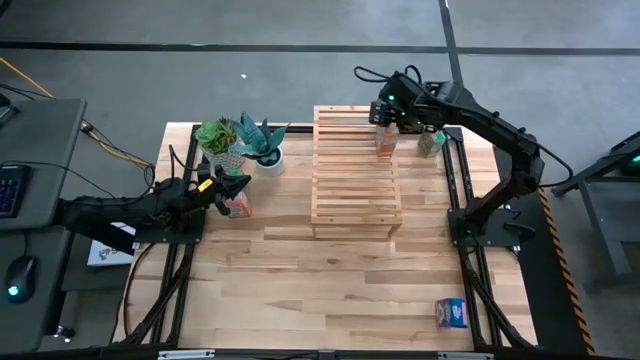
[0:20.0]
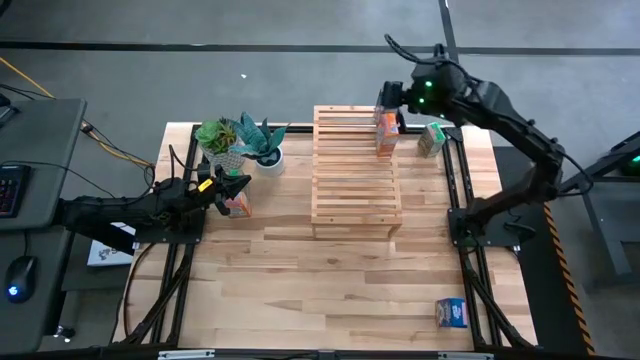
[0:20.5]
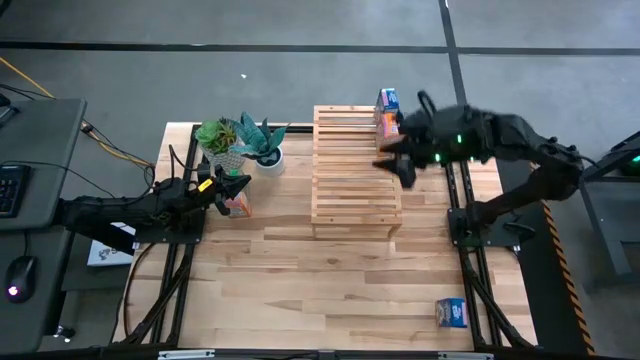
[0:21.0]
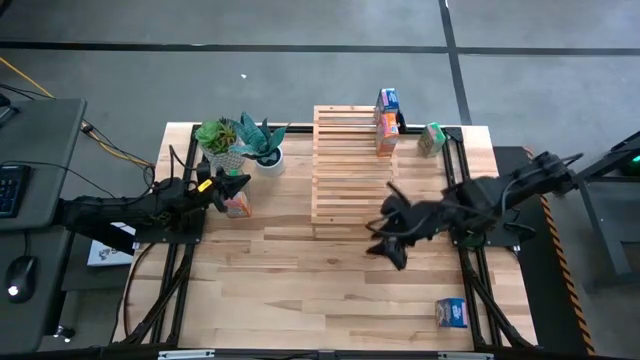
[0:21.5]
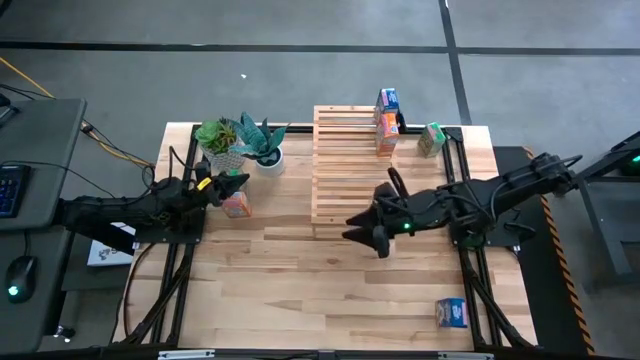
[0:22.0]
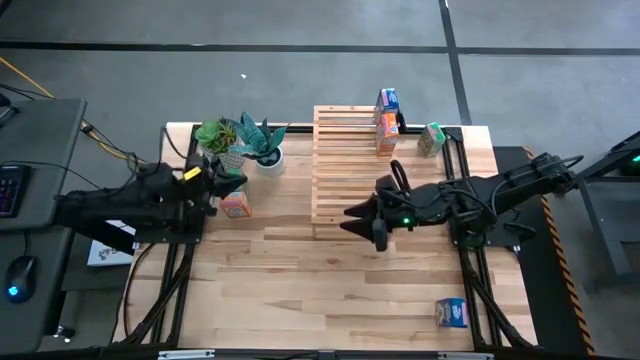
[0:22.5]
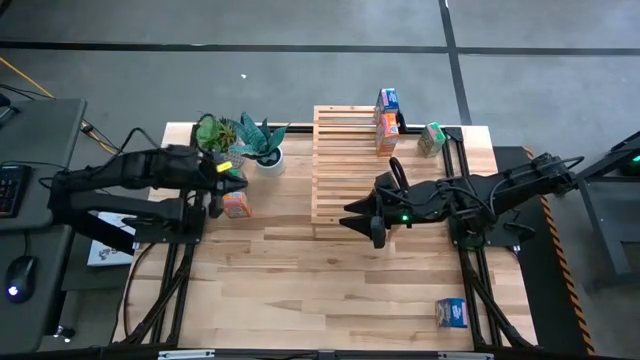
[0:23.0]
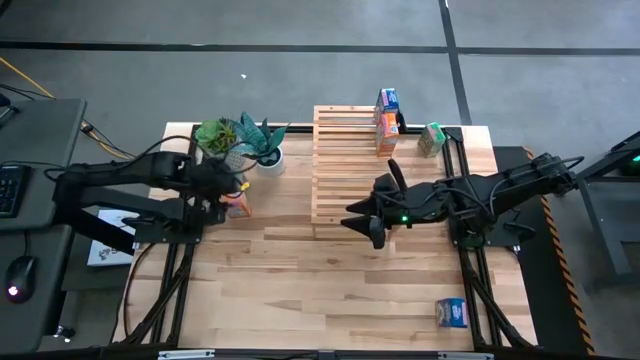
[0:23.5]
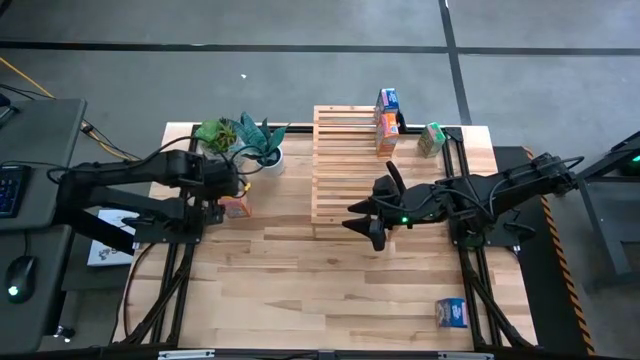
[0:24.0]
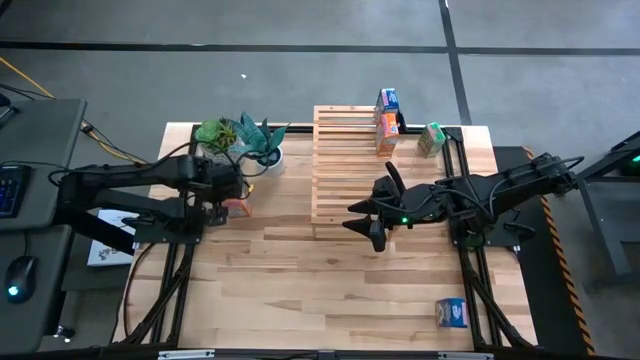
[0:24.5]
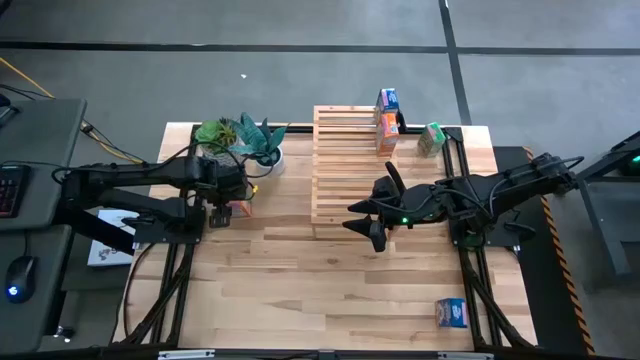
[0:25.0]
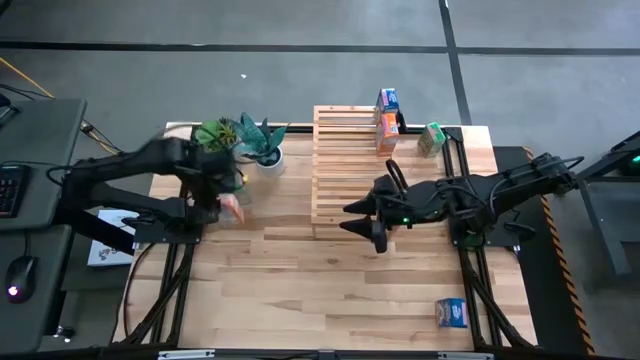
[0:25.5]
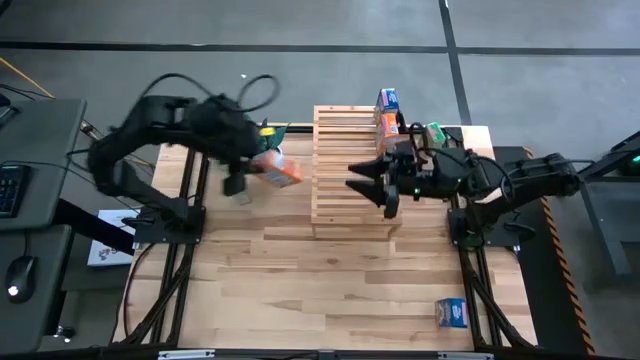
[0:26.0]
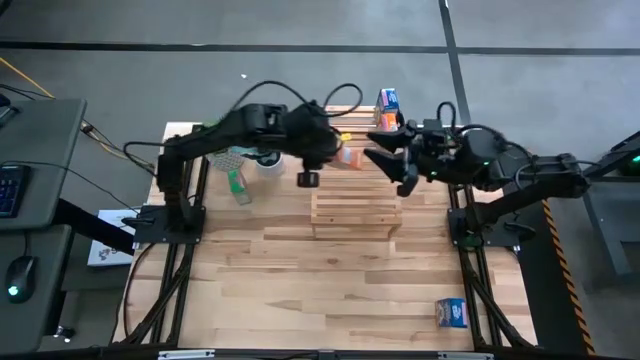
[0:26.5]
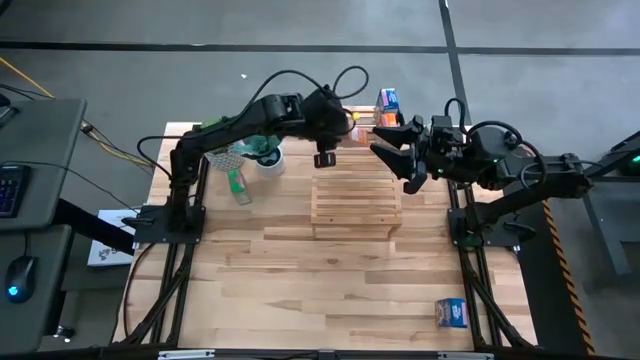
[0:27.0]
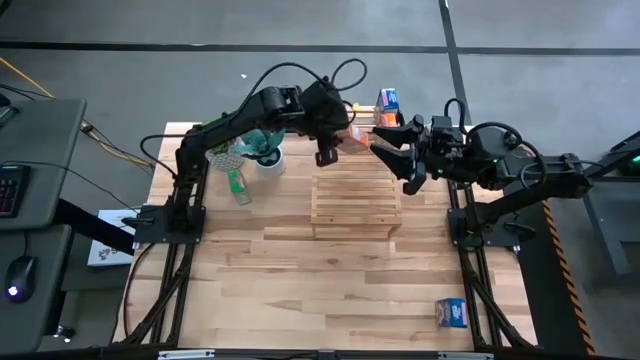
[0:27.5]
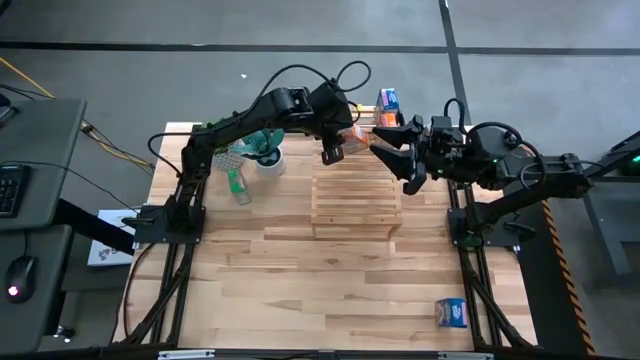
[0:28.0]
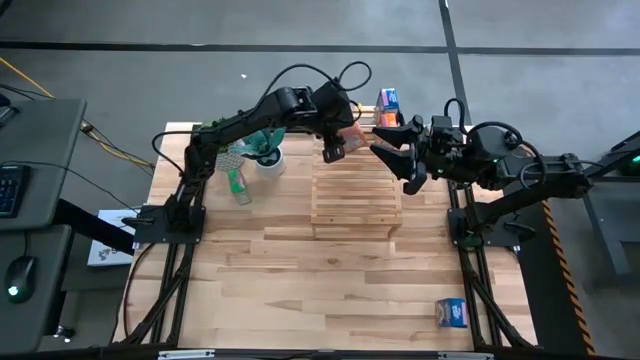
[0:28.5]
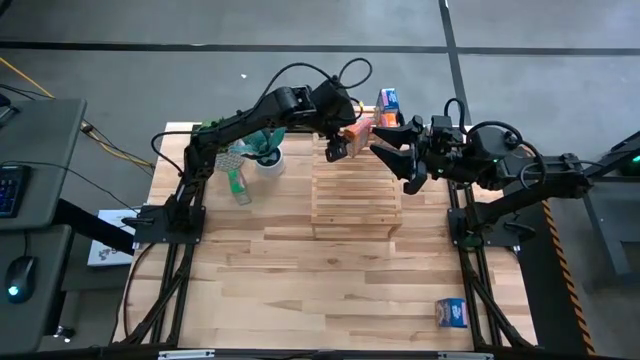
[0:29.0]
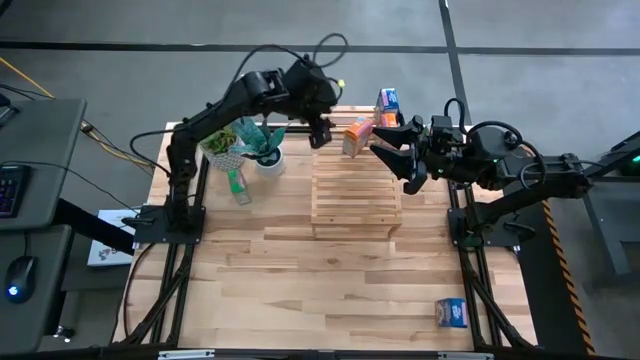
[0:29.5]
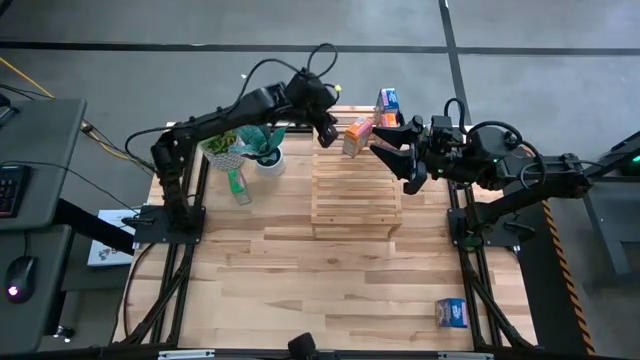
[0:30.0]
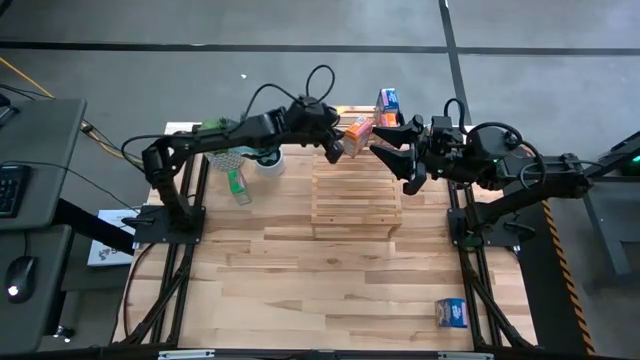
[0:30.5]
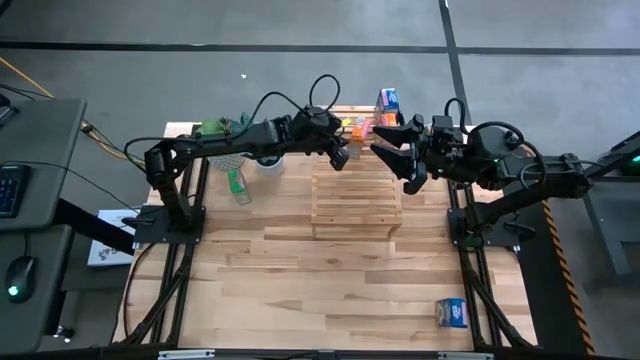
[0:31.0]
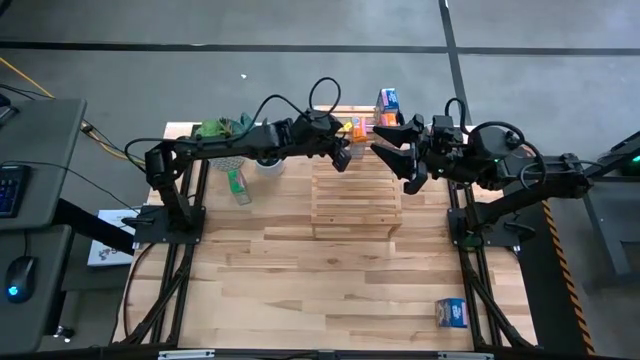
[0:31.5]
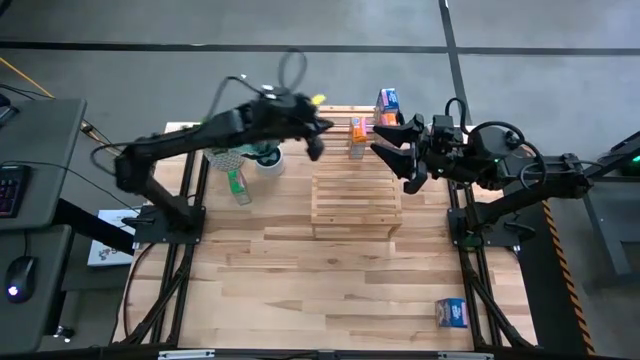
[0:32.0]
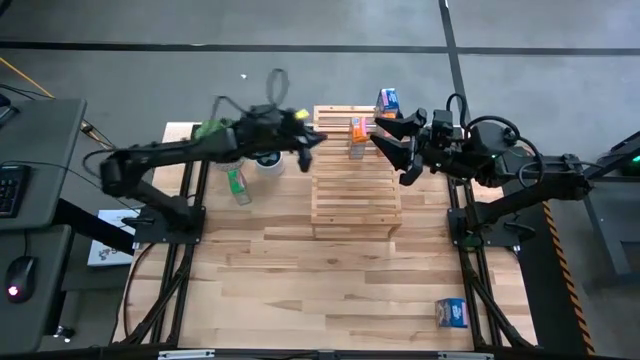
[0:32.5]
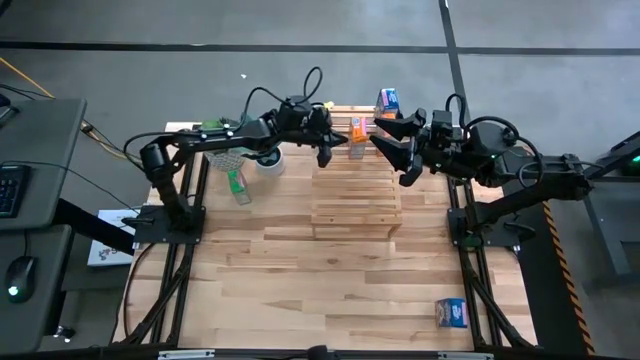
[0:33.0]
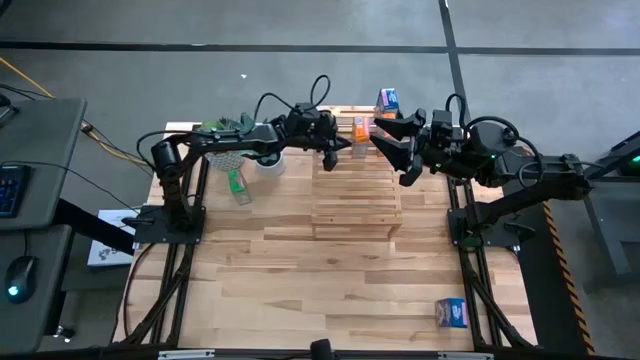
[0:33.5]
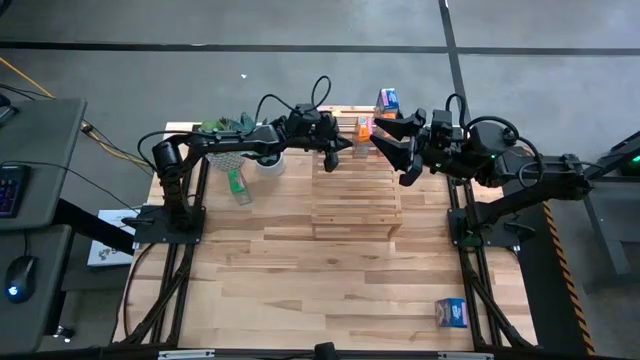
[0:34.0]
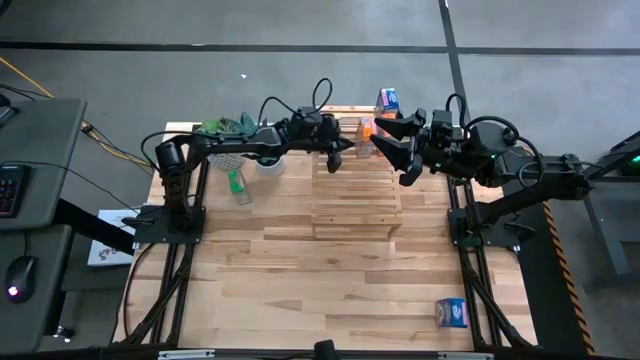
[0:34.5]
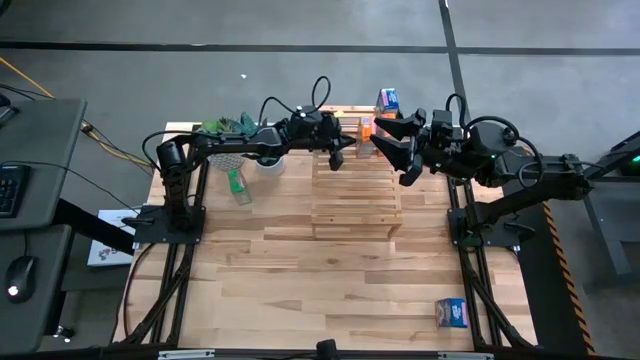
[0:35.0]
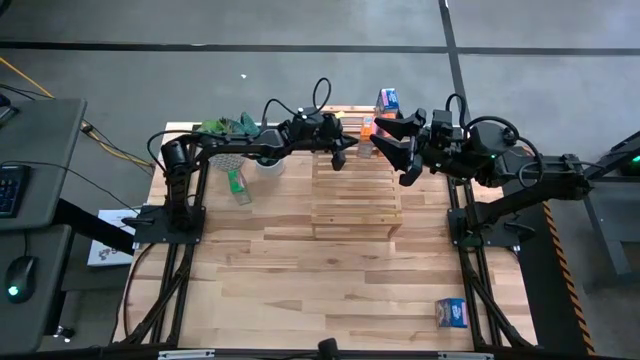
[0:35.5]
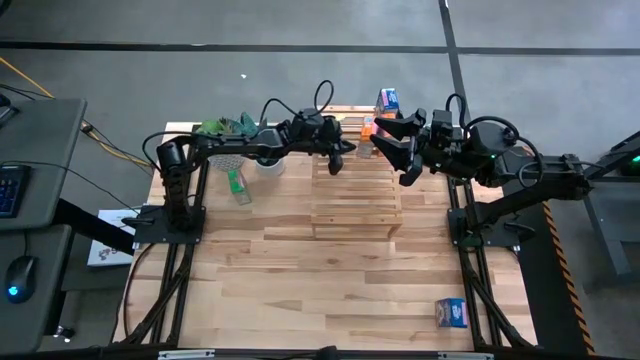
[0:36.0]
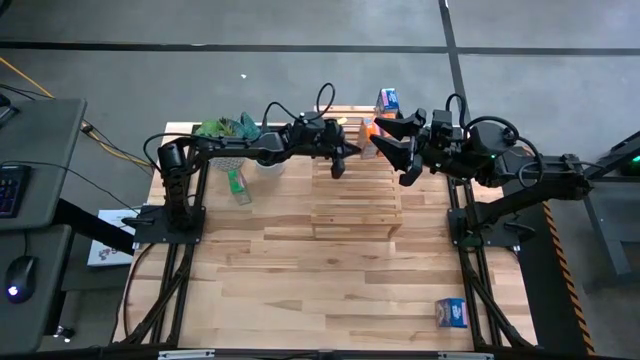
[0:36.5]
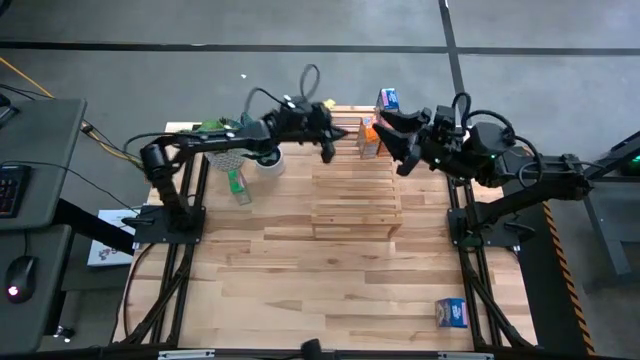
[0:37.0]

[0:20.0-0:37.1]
Task: Stack cereal on shelf
Put the orange cereal box aligned with the other orange cereal box on the shelf

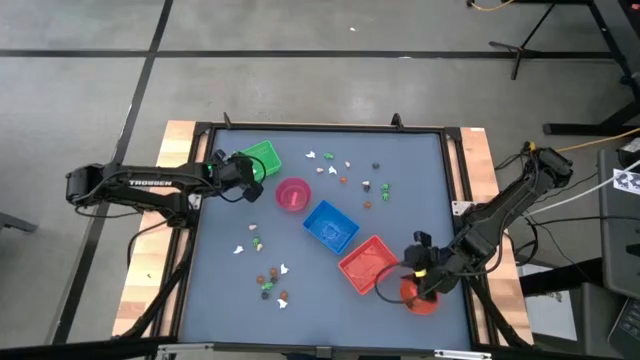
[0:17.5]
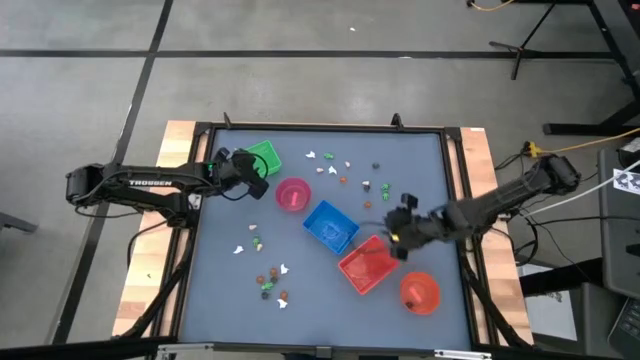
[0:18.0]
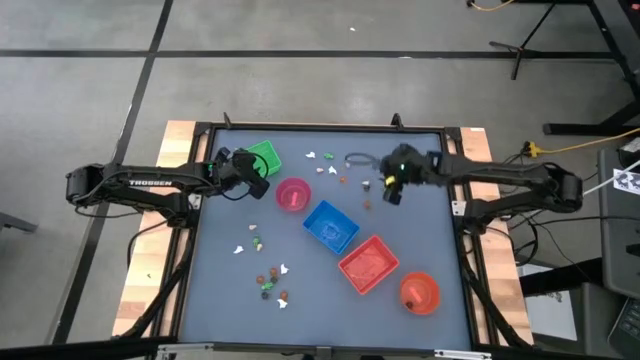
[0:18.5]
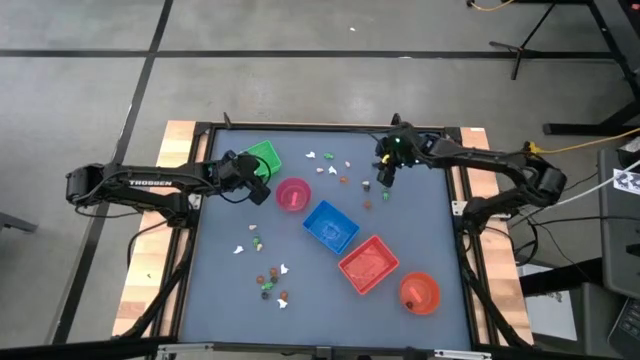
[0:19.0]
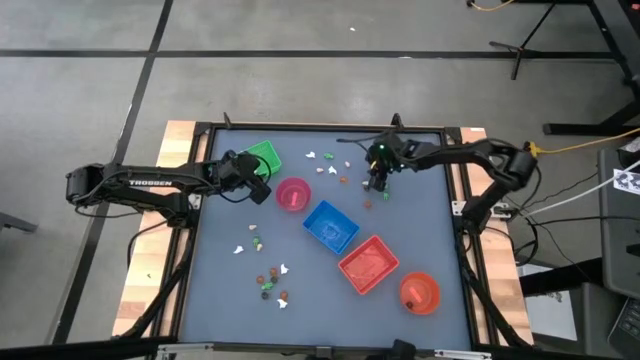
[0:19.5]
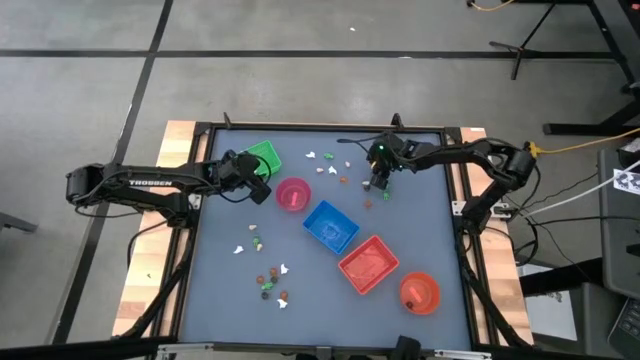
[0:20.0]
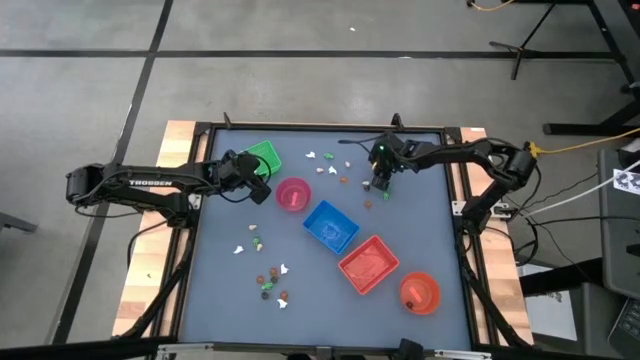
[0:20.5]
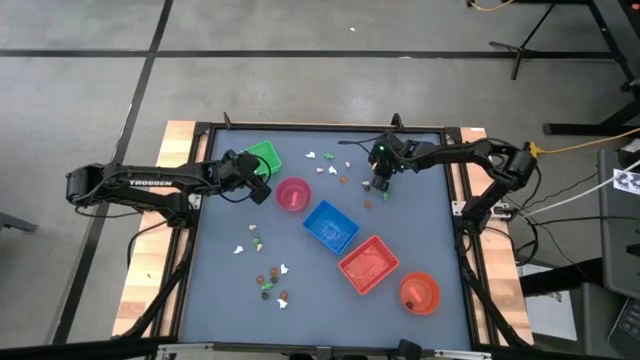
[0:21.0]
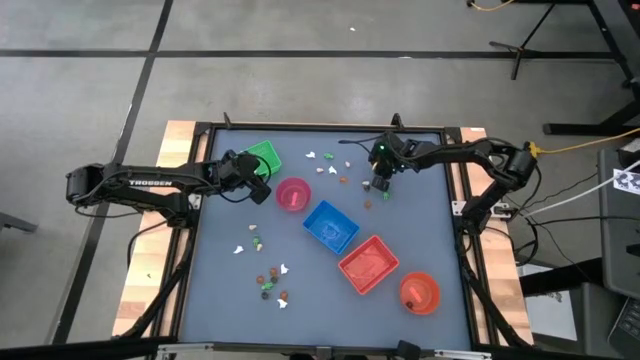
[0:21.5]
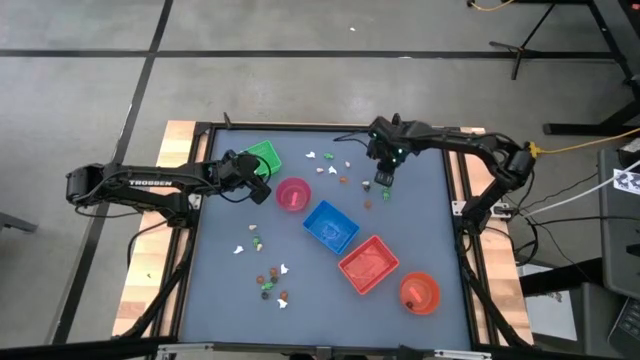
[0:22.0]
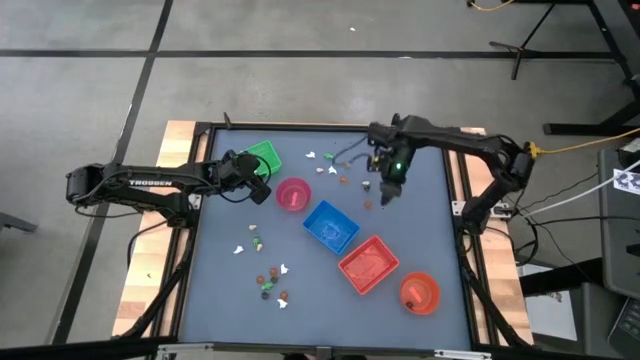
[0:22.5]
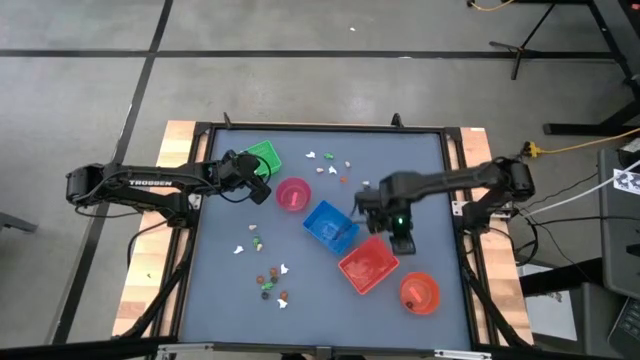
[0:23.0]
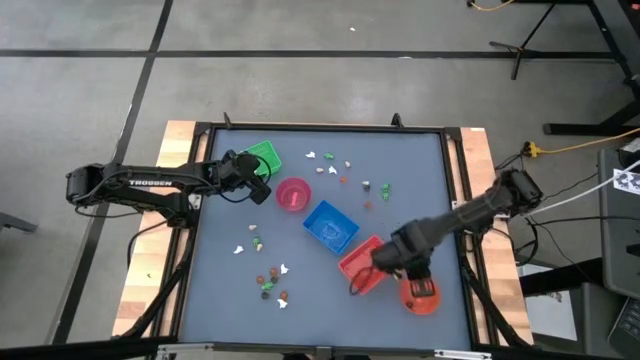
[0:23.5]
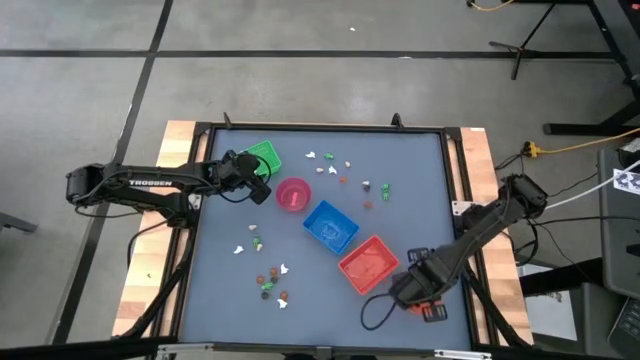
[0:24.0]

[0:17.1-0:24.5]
Task: Sort Halloween decoration
Put the black skull toy into the transparent orange bin
